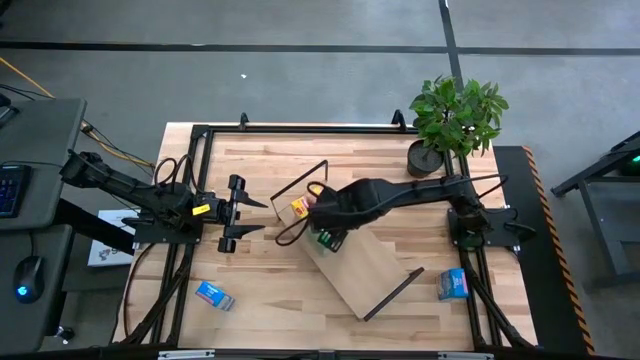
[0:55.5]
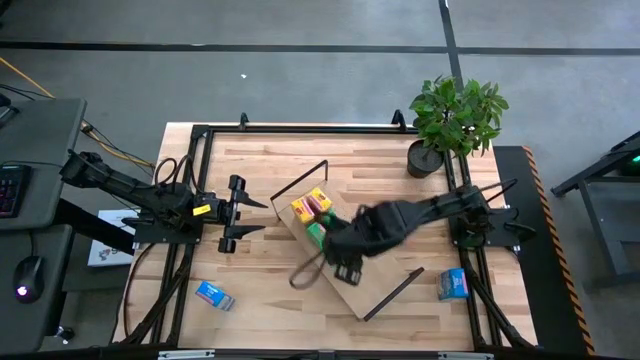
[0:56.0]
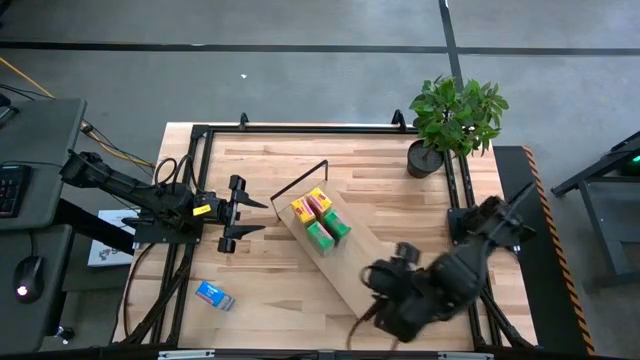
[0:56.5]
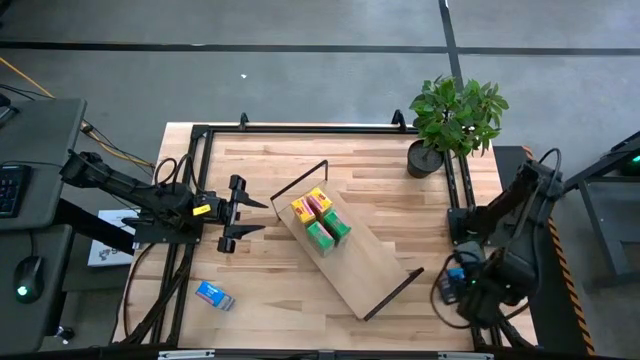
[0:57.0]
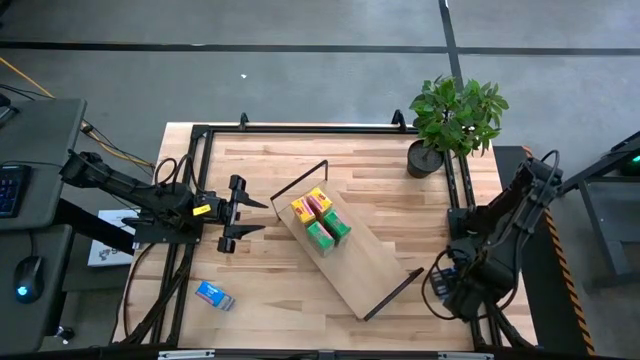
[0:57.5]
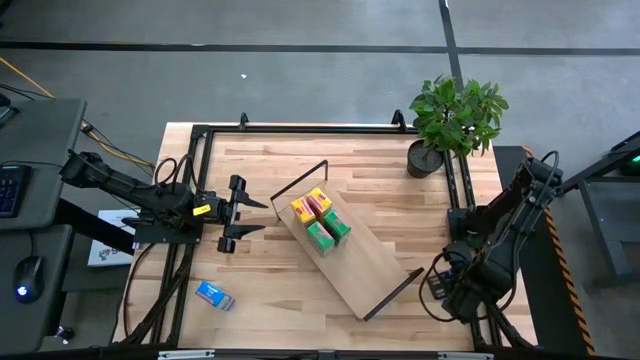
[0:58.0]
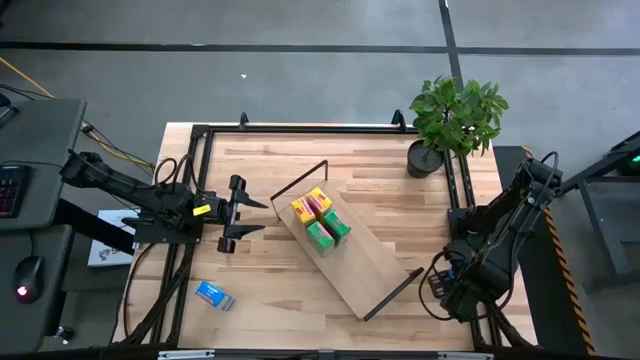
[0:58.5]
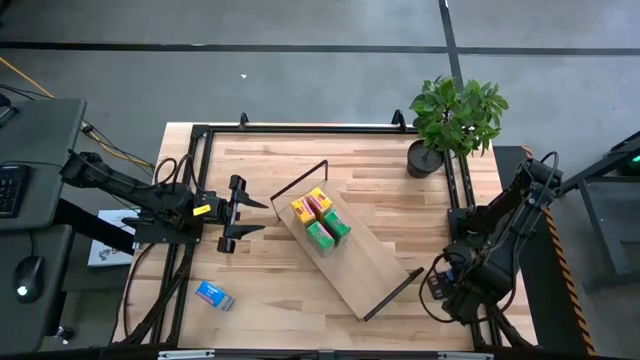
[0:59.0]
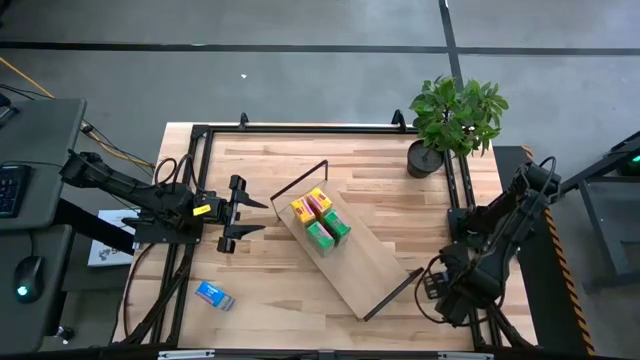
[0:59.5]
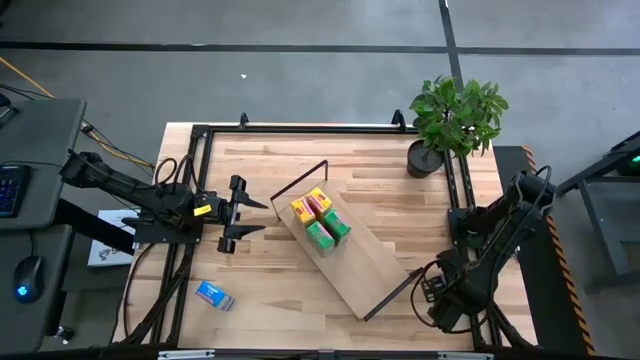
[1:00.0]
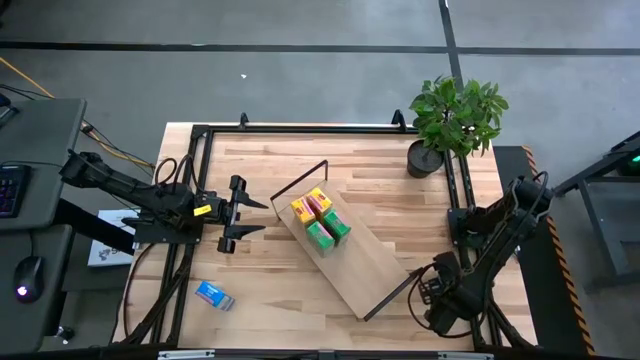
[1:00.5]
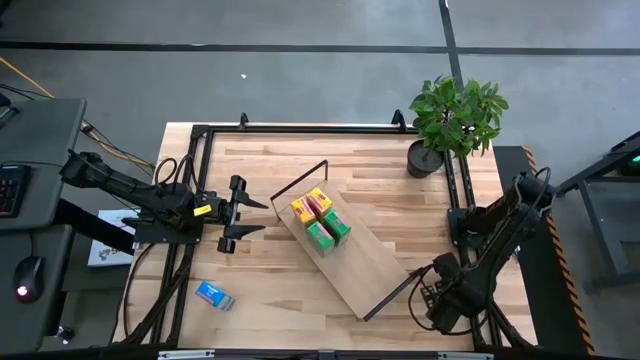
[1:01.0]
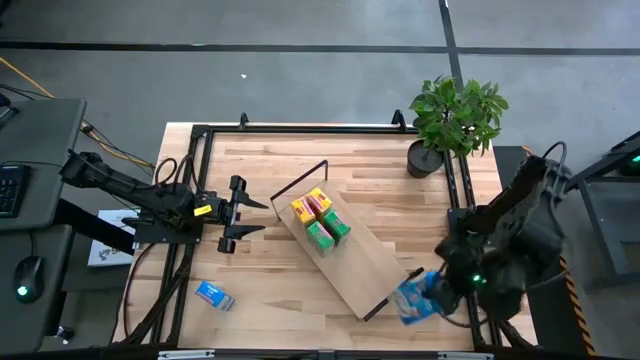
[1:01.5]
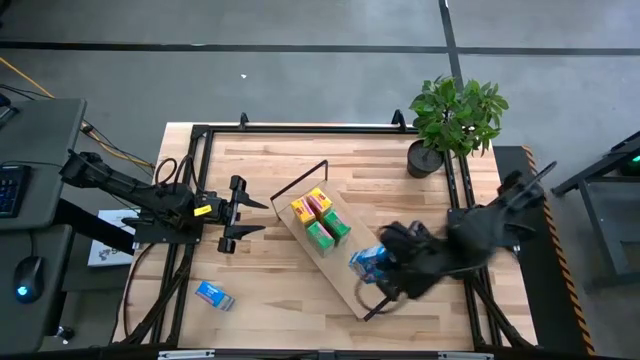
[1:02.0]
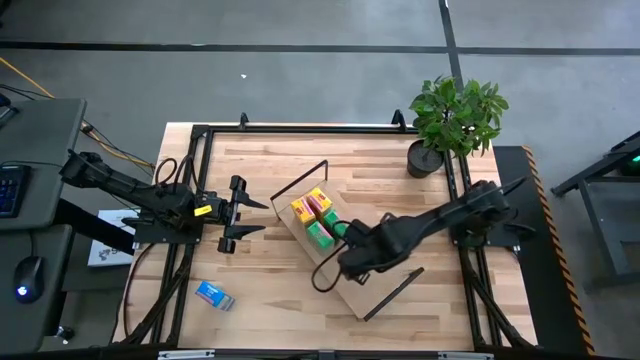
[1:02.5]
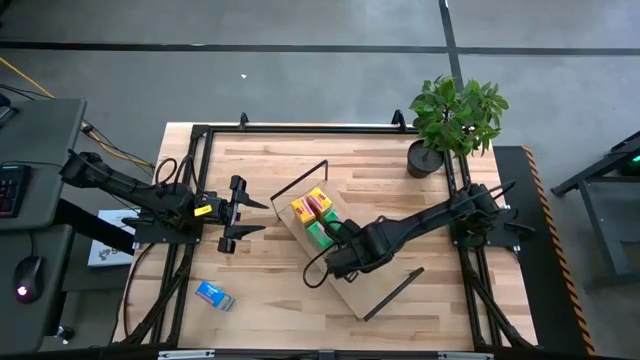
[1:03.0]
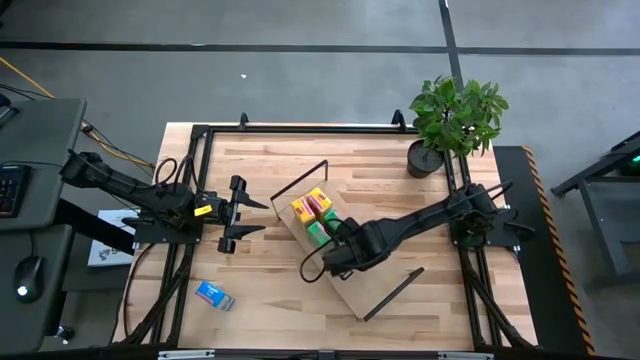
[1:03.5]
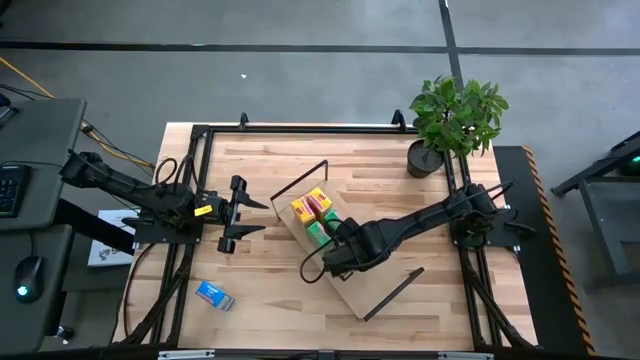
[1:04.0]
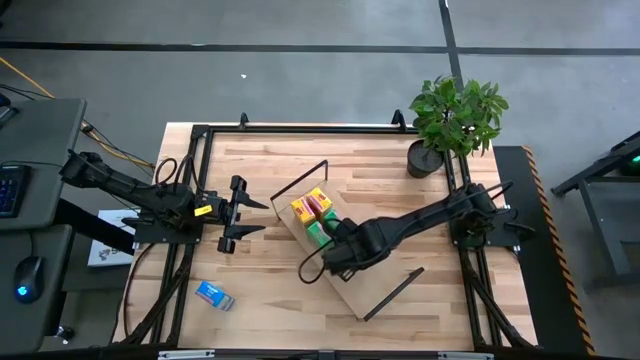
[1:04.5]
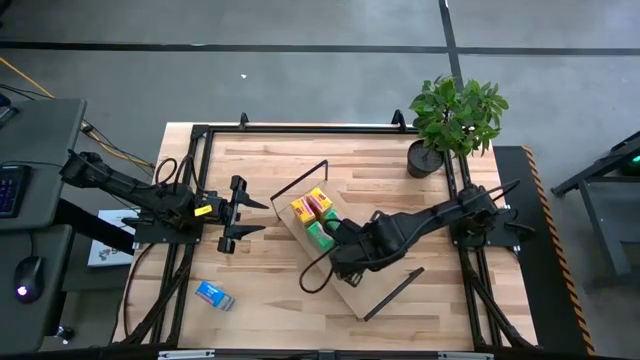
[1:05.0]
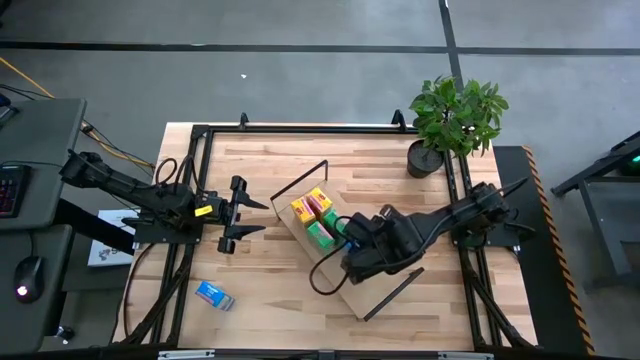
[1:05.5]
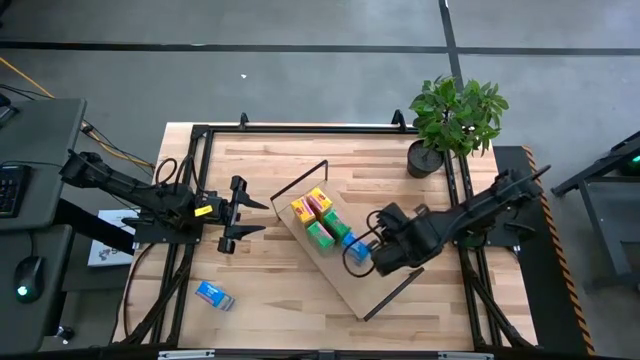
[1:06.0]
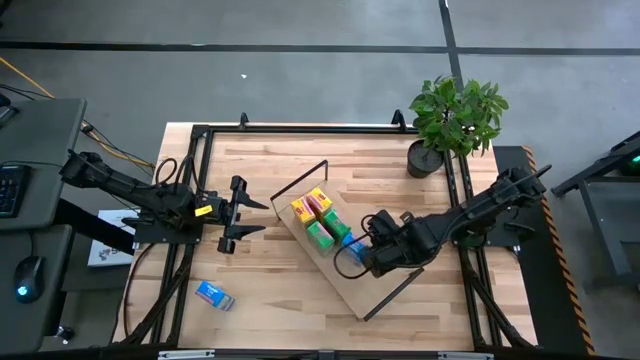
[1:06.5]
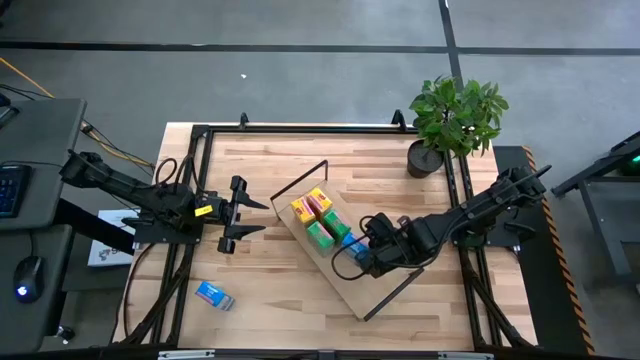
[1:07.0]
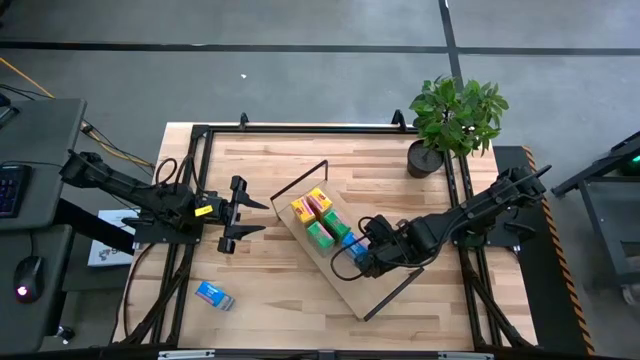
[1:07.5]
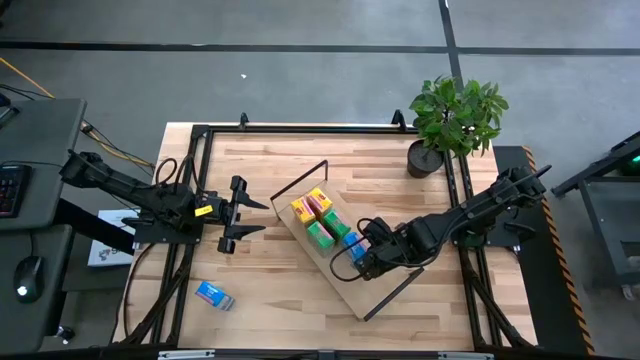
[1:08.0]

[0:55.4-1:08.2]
Task: Stack cereal on shelf
Put the right blue cereal box on the shelf

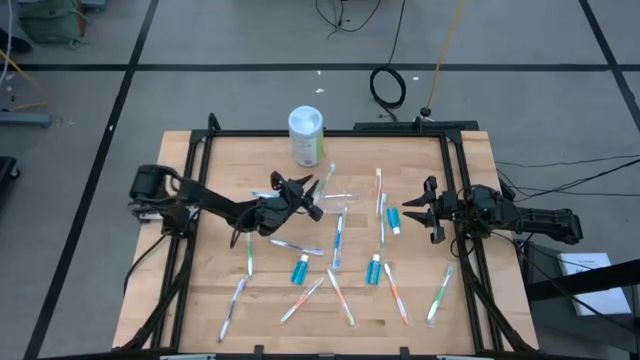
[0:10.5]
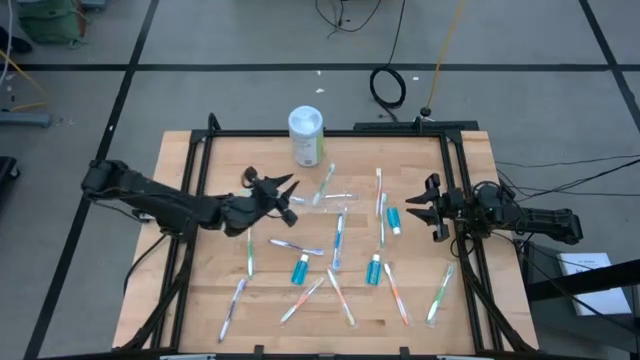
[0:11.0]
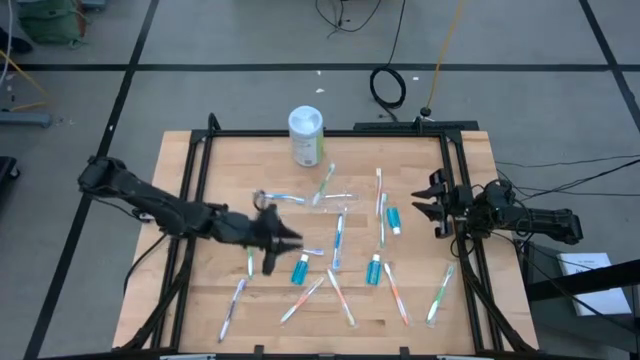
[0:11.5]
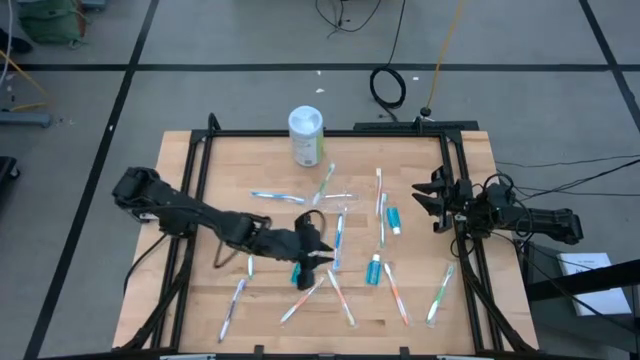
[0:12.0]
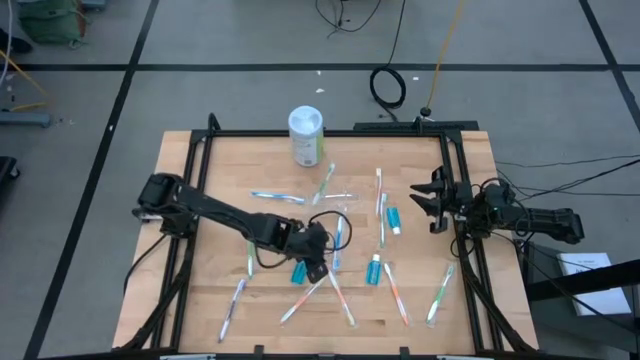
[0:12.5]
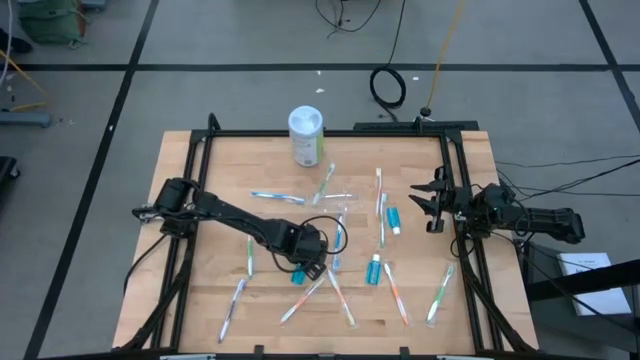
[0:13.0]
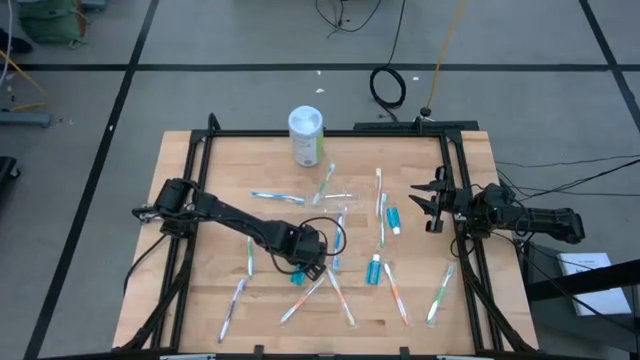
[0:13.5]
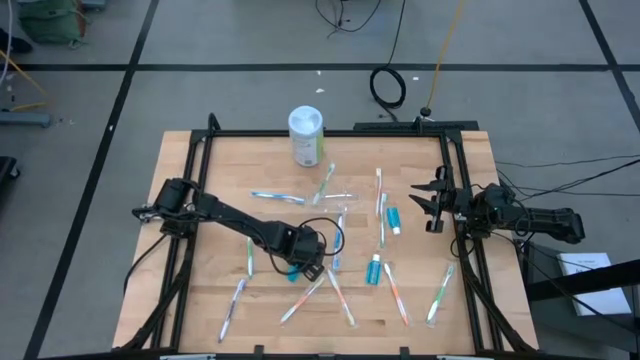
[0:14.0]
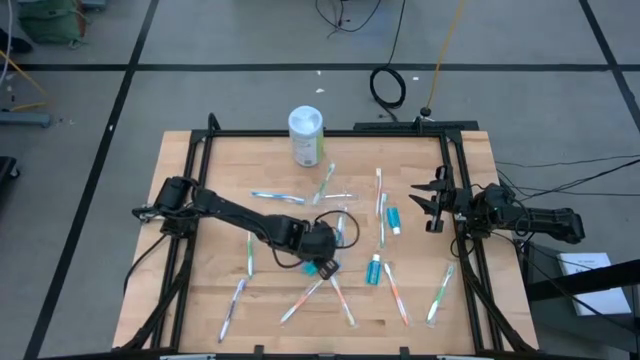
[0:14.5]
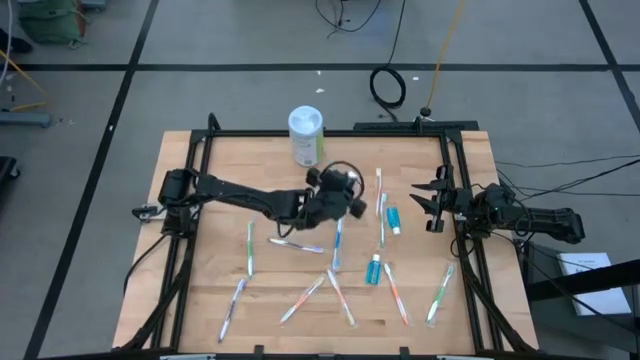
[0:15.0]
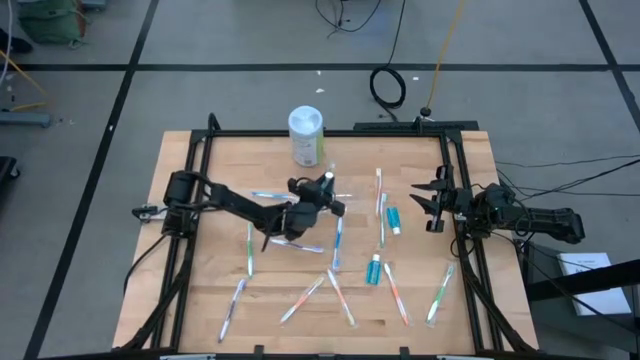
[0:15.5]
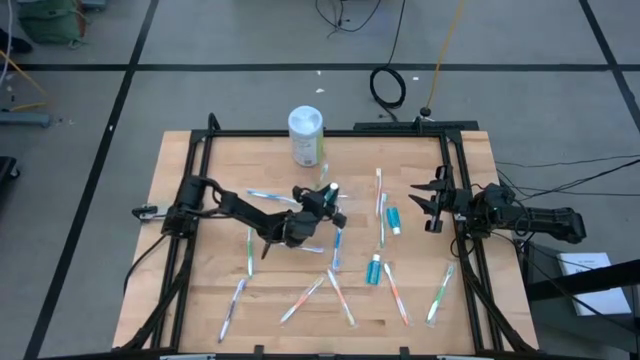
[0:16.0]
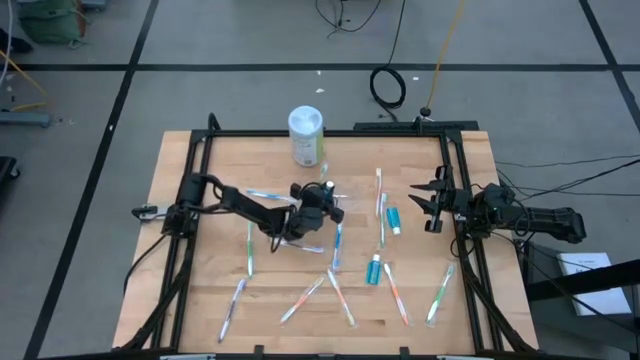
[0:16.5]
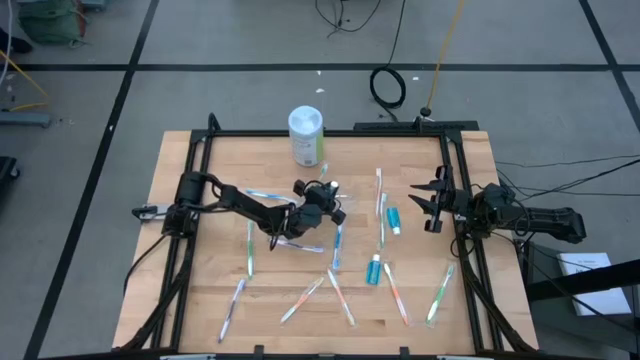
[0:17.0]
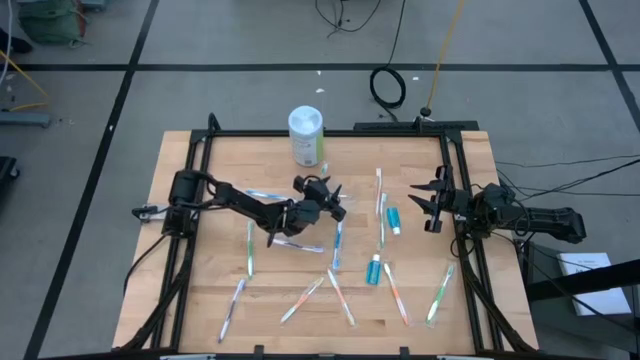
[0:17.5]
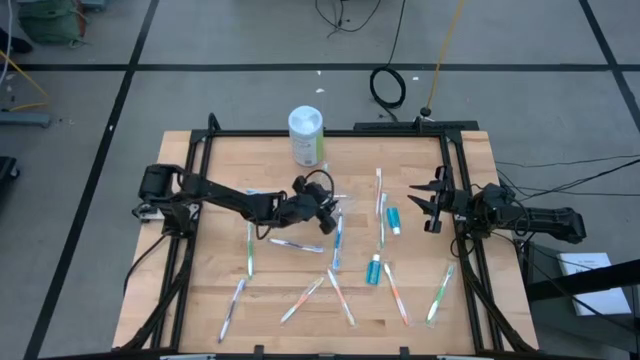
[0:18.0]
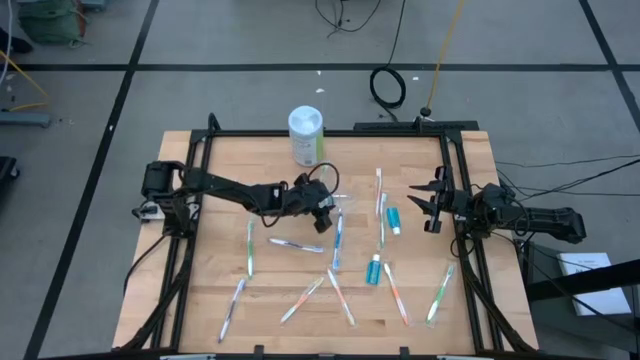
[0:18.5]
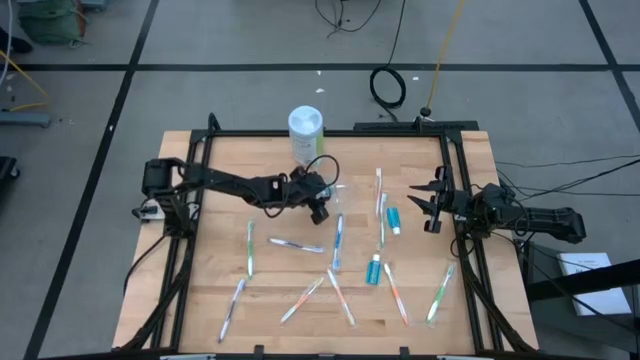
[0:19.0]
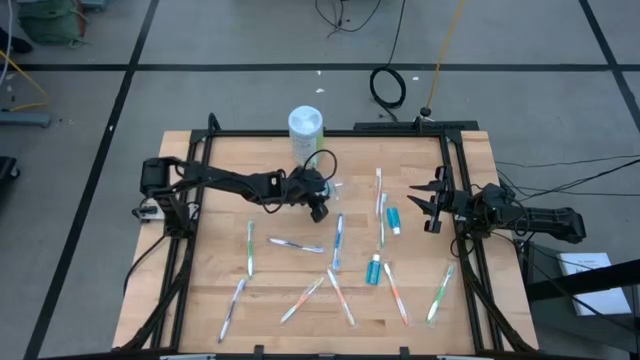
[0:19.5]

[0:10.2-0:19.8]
Task: Pick & Place toothbrushing station
Put the blue mouthwash into the transparent organizer
